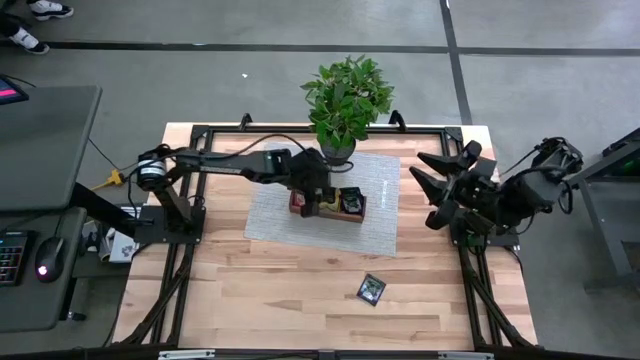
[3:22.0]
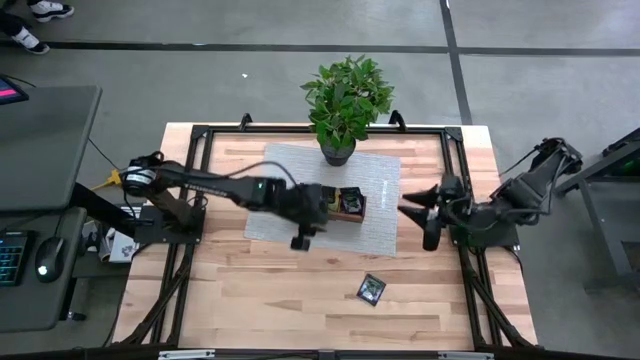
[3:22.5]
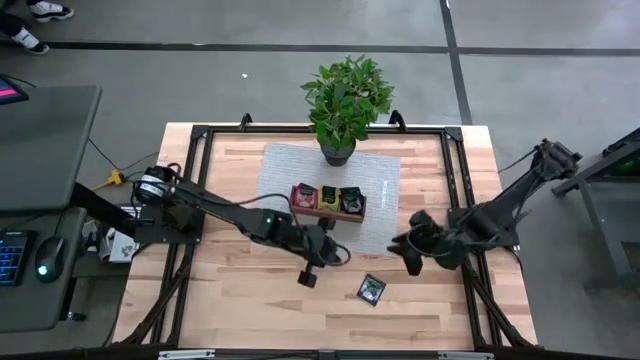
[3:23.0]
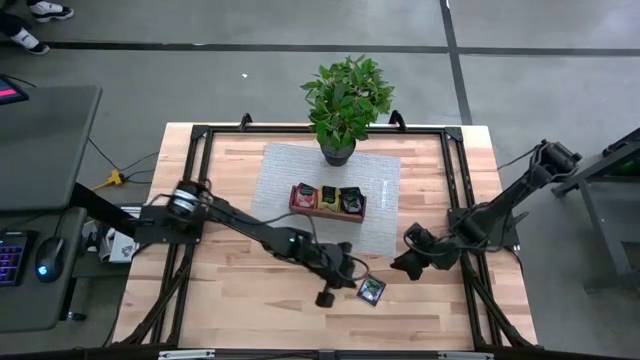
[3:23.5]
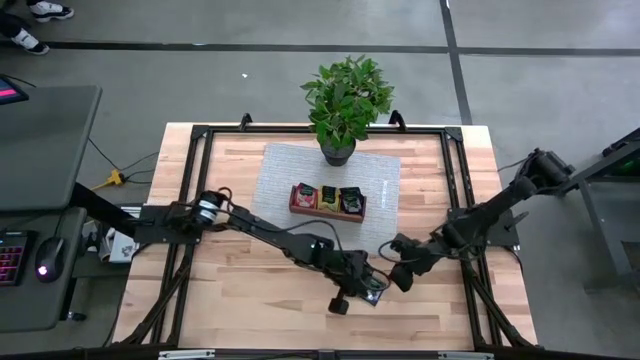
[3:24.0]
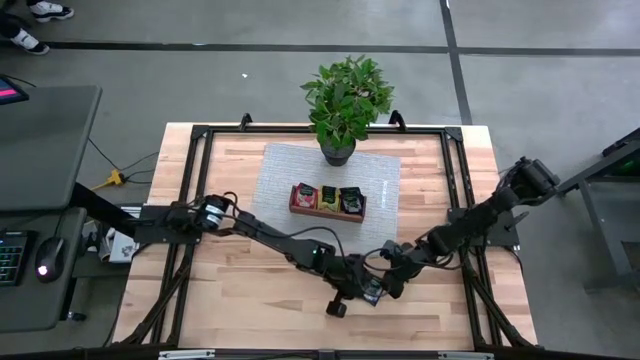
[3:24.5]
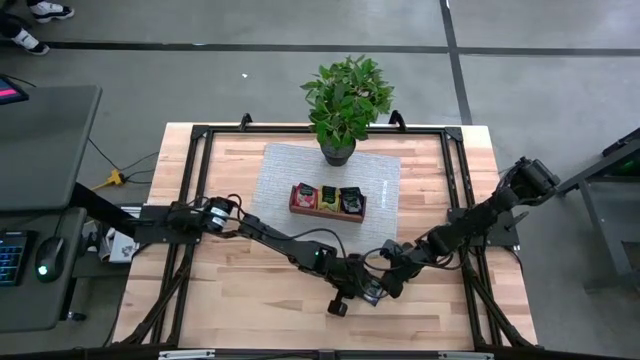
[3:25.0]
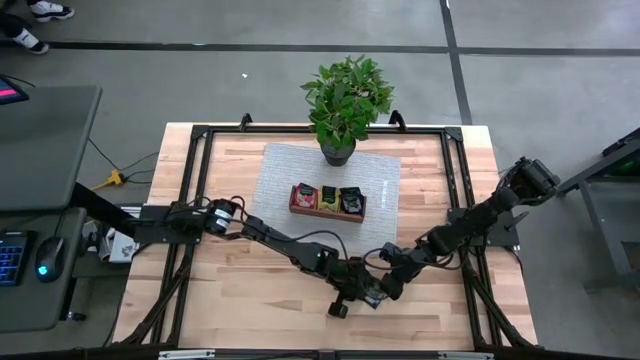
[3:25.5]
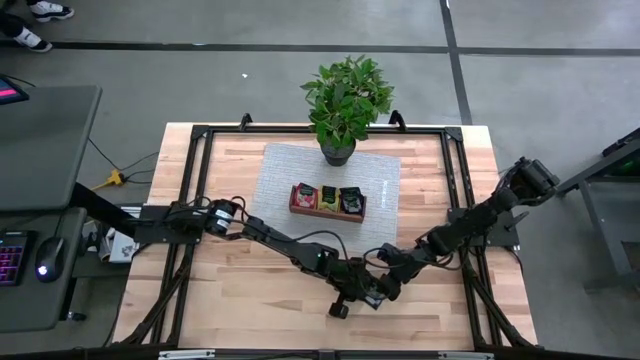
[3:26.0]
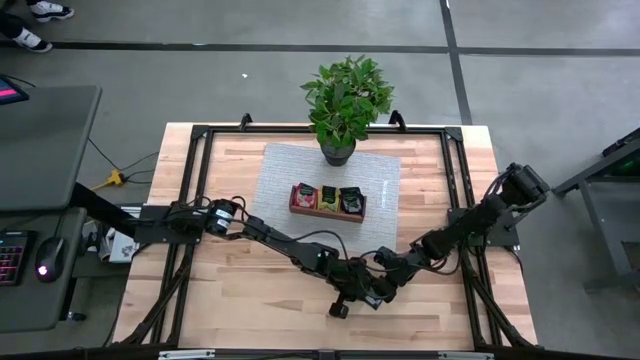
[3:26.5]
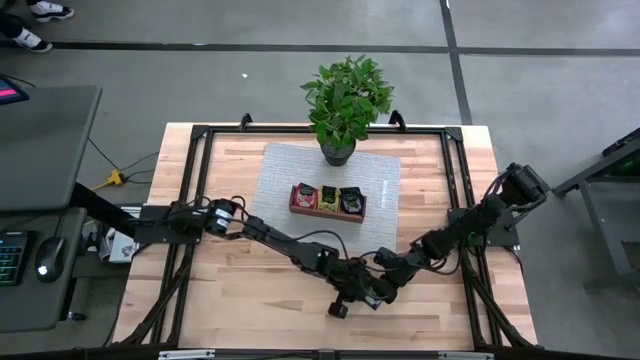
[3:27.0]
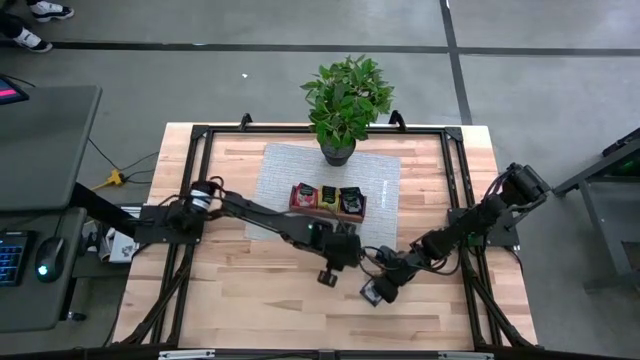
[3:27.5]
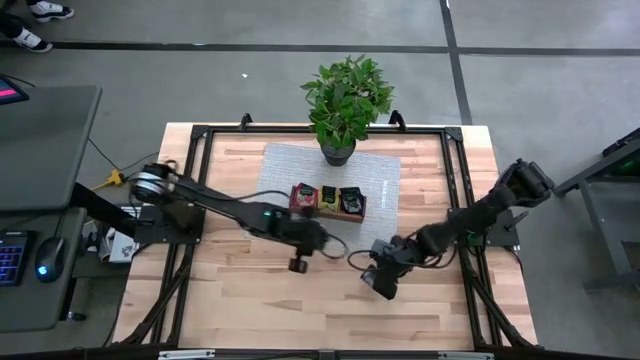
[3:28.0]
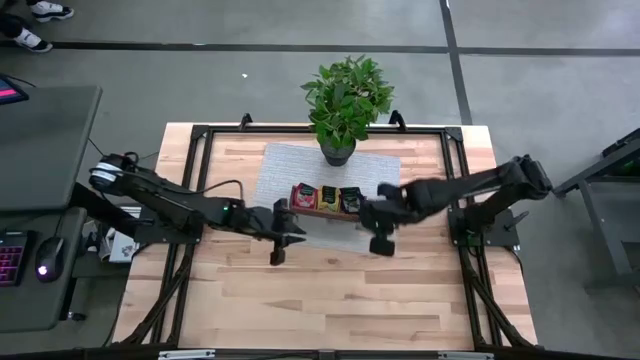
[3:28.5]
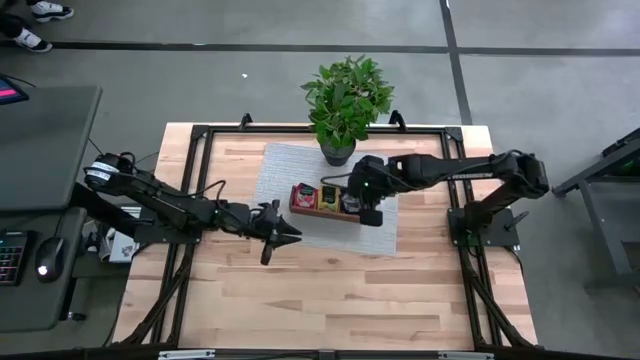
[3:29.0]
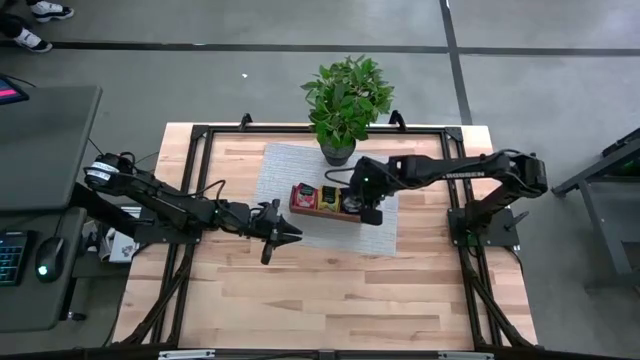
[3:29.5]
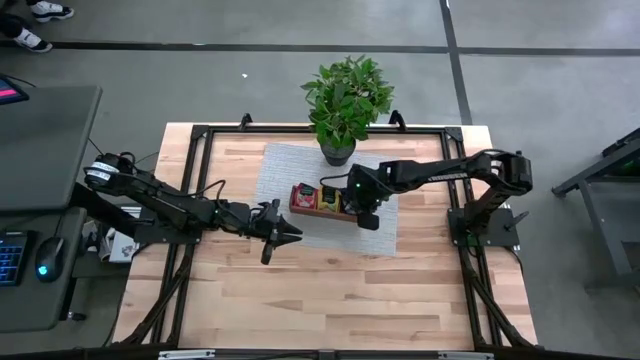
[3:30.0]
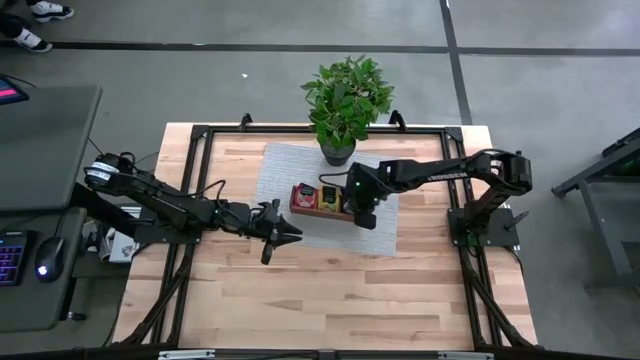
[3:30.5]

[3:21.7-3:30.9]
Task: Pick & Place Tea
Put the violet tea bag into the right section of the wooden organizer

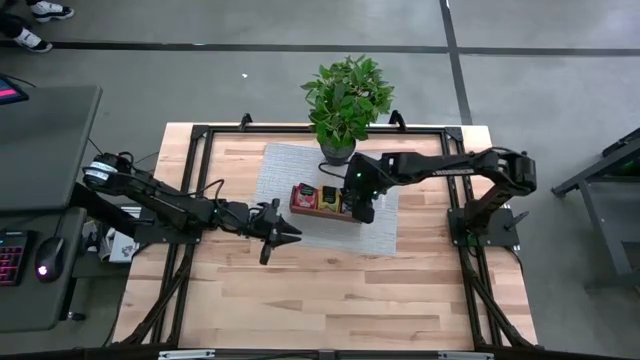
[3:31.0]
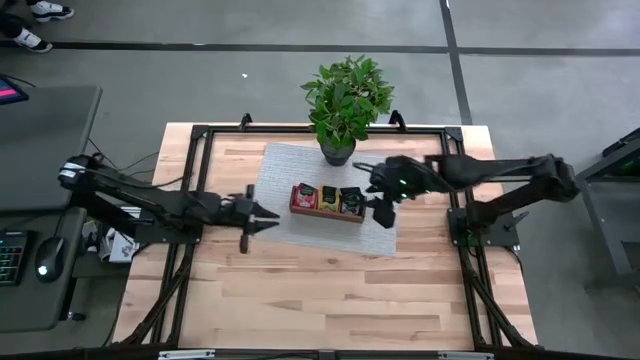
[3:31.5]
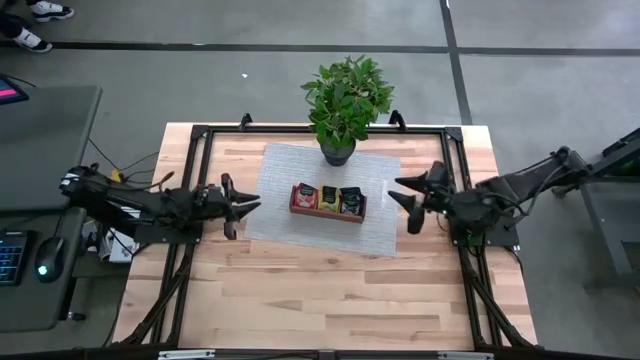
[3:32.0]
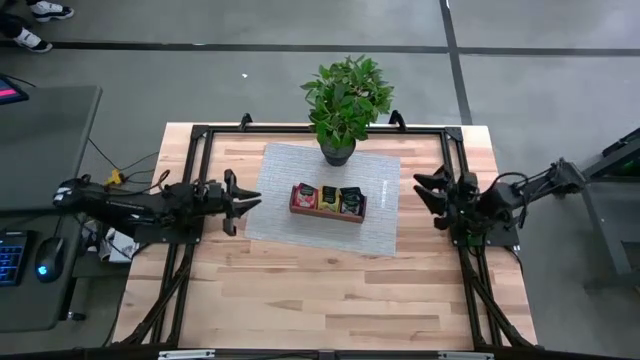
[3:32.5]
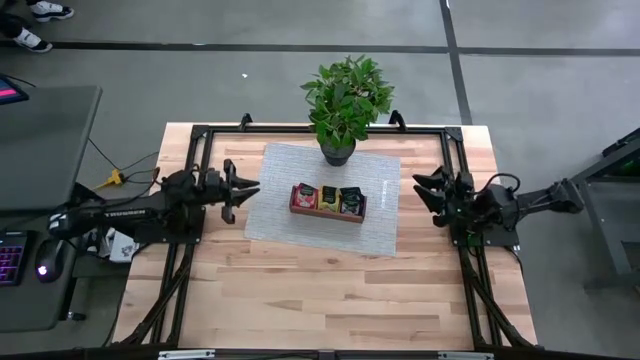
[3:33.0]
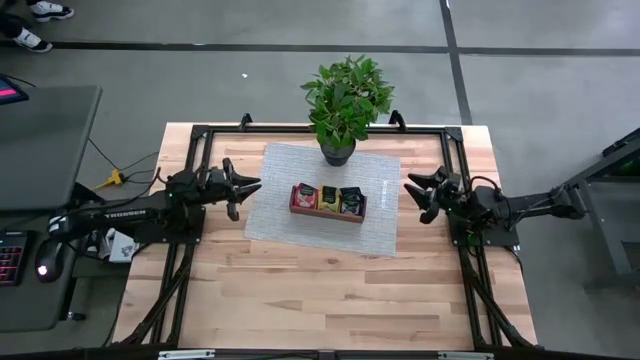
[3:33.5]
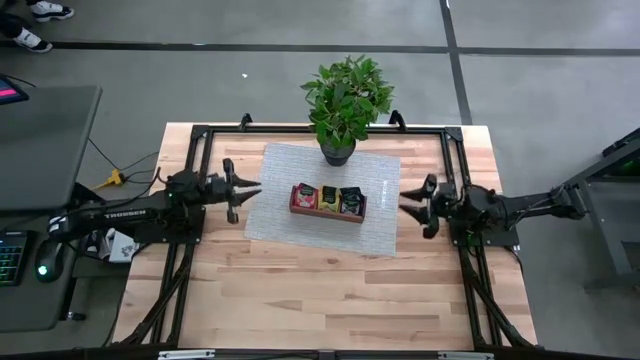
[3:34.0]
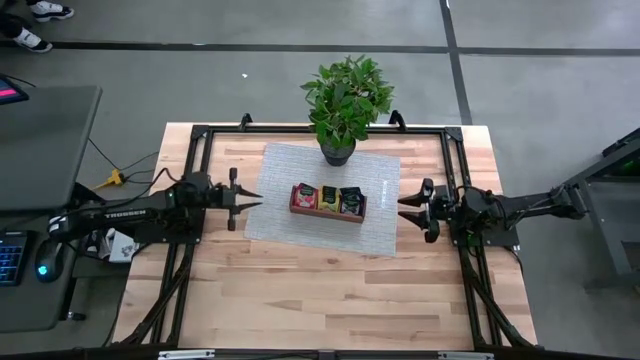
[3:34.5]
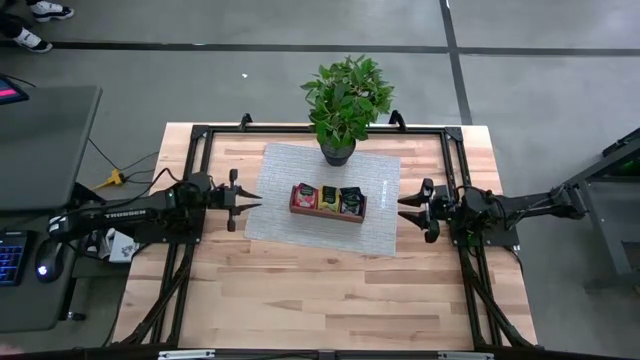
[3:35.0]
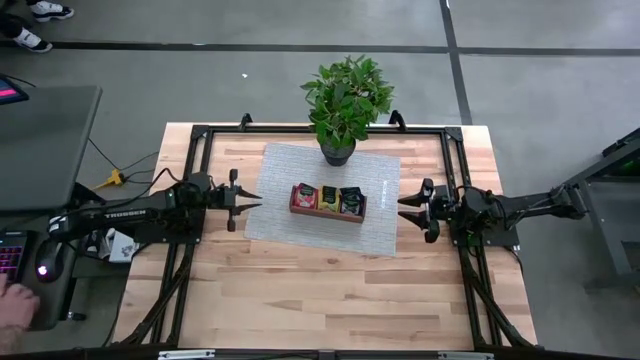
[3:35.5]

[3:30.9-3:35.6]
Return to Home Position

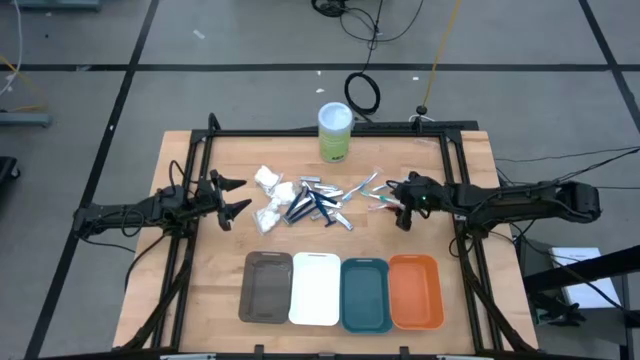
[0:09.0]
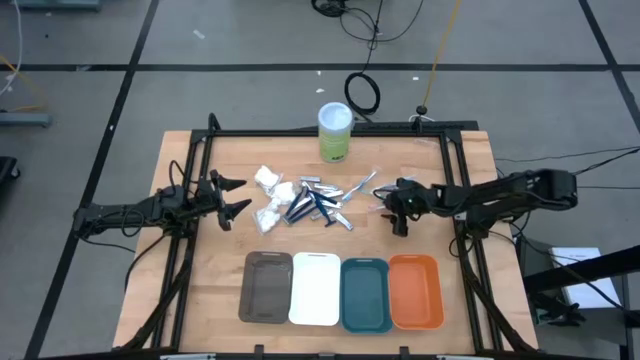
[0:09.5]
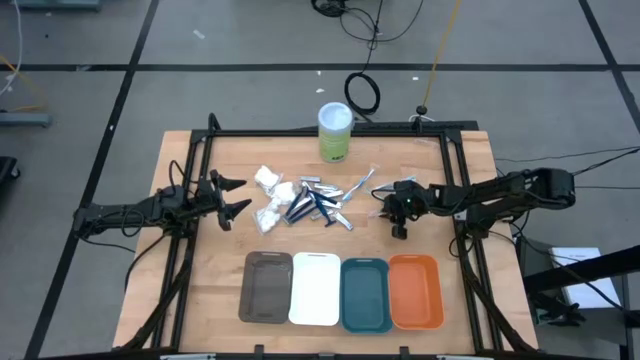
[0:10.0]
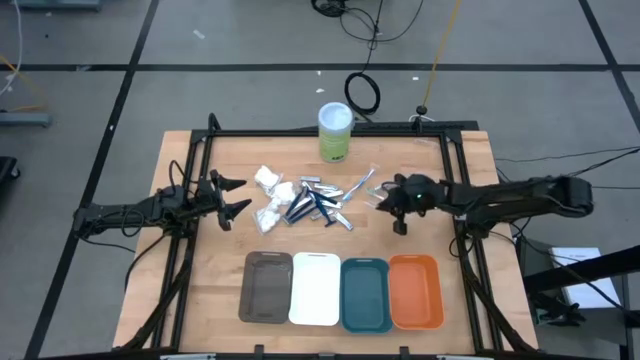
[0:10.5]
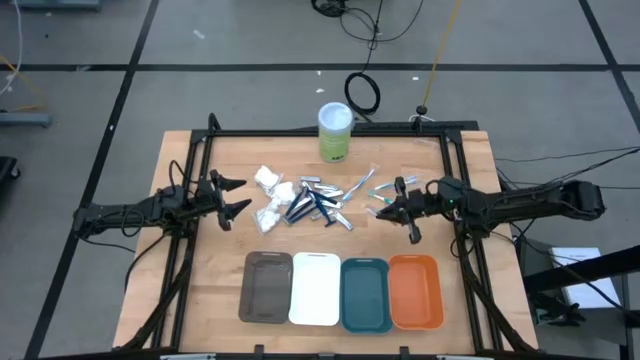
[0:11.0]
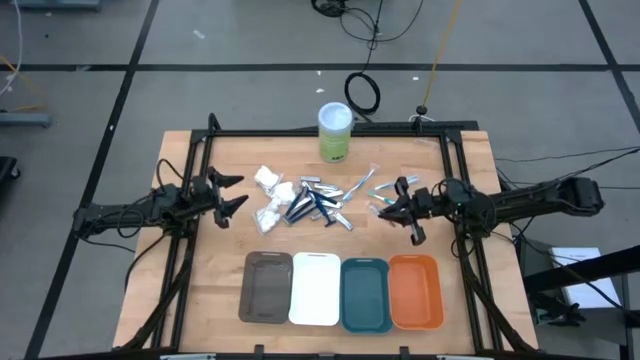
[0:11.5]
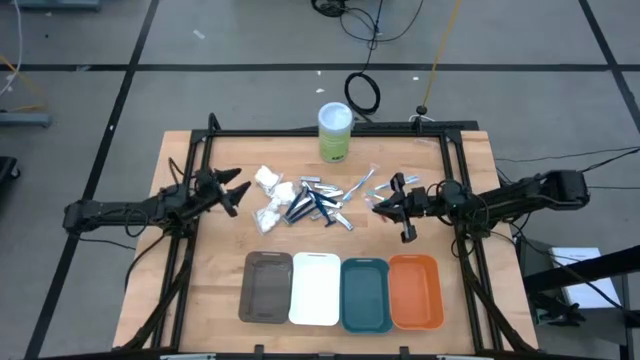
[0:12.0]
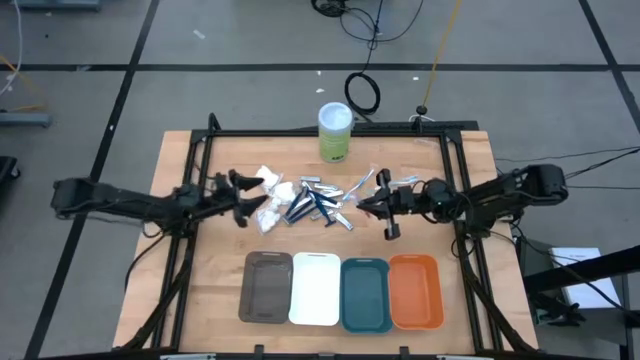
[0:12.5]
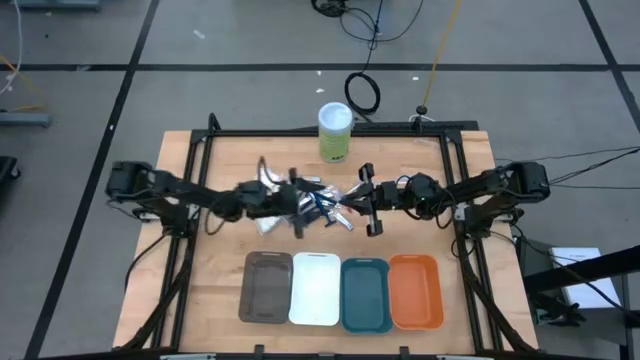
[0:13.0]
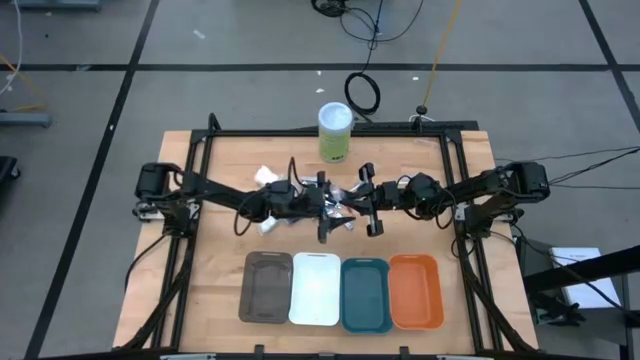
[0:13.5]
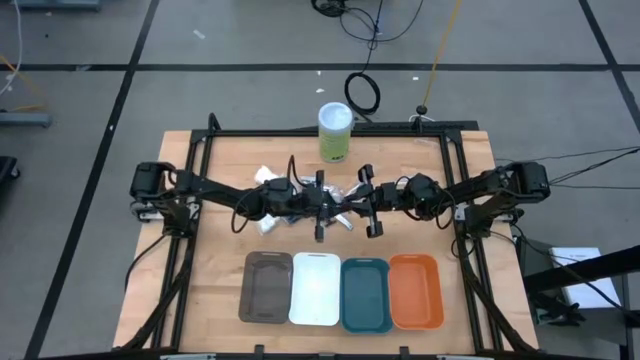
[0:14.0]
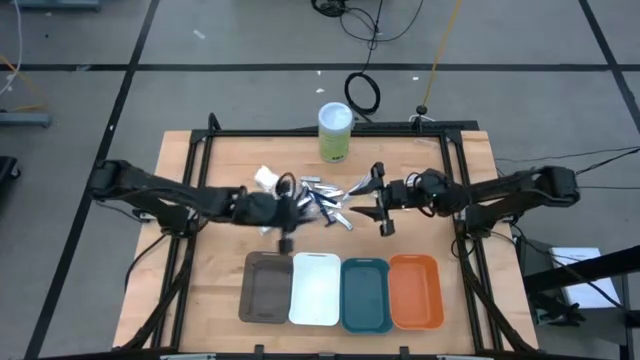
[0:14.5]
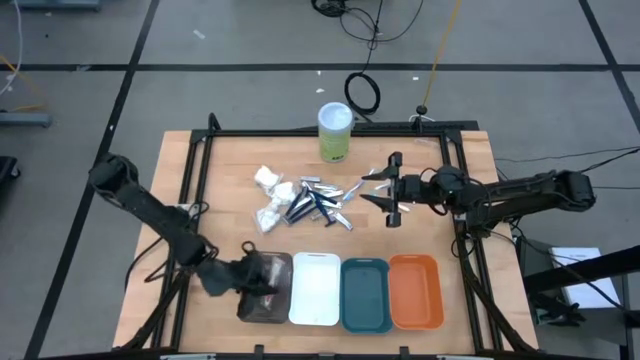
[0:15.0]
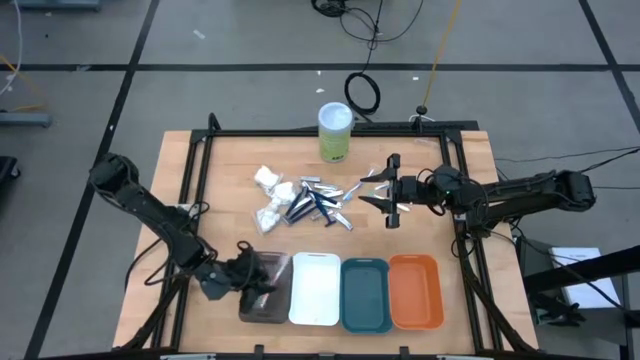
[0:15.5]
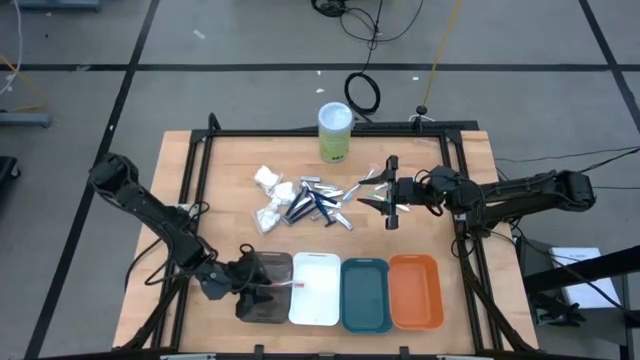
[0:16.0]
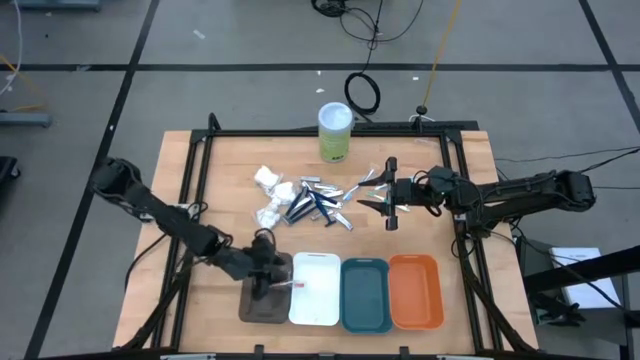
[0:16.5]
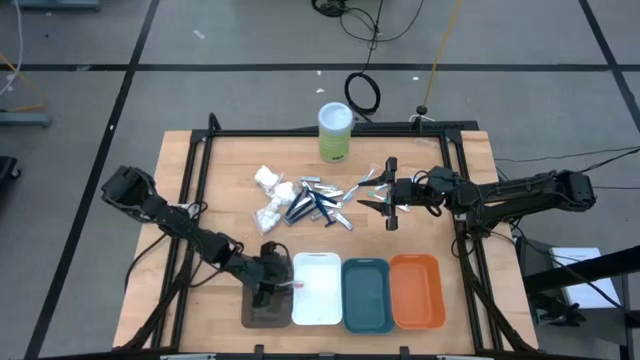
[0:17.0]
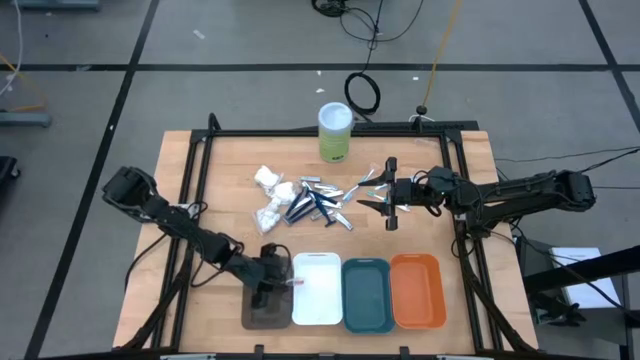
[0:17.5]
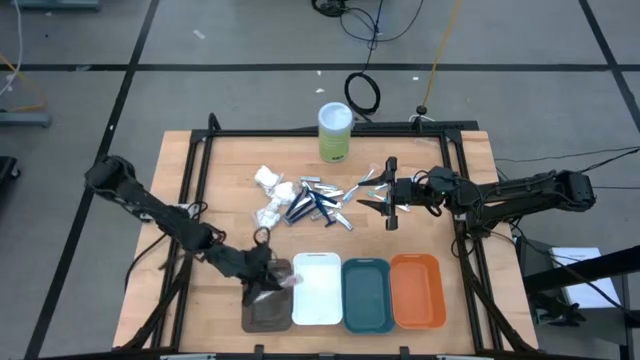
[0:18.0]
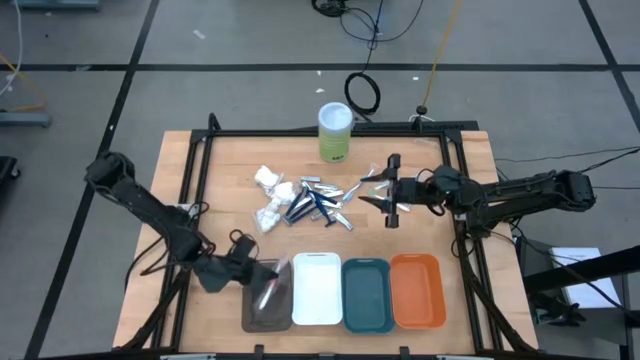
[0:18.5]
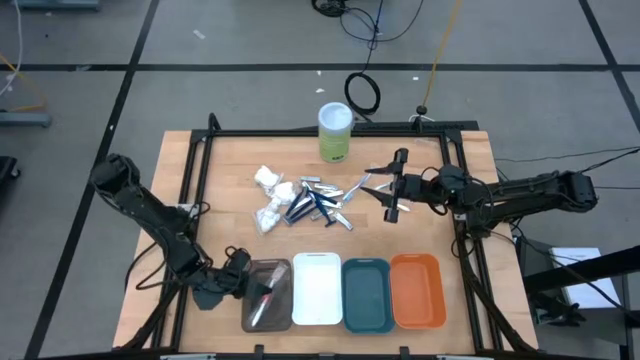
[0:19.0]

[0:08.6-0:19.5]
Task: Pick & Place Travel size toiletries
Put the red toothbrush into the black bin
